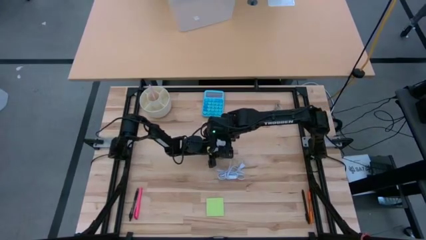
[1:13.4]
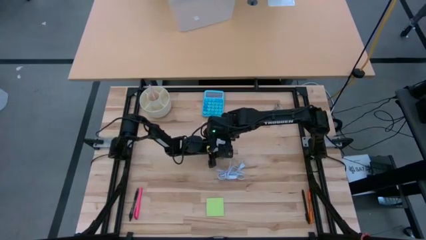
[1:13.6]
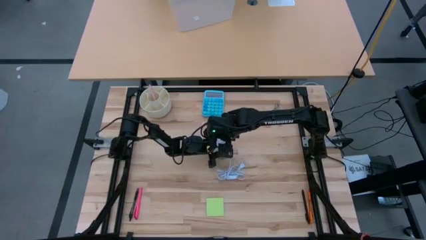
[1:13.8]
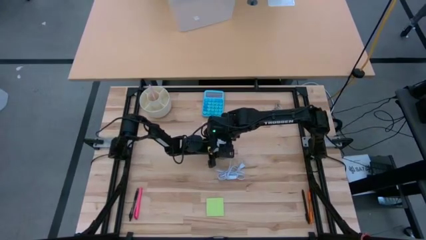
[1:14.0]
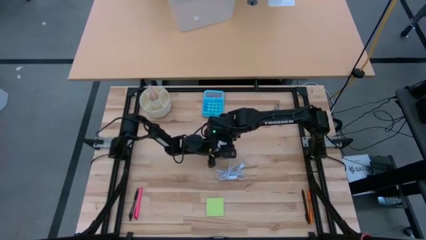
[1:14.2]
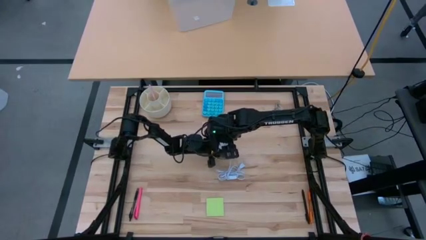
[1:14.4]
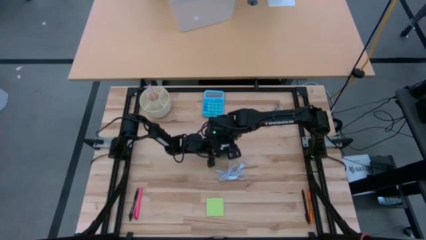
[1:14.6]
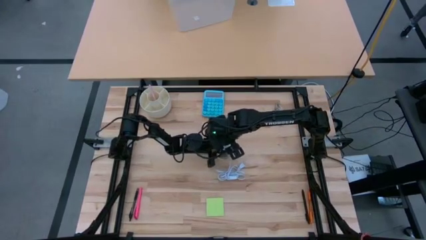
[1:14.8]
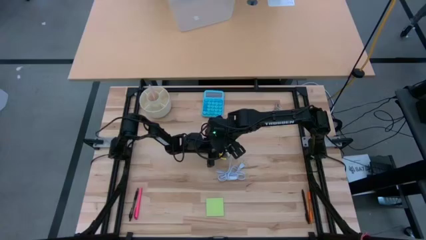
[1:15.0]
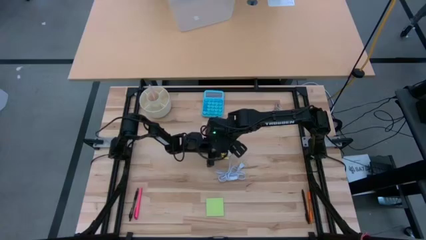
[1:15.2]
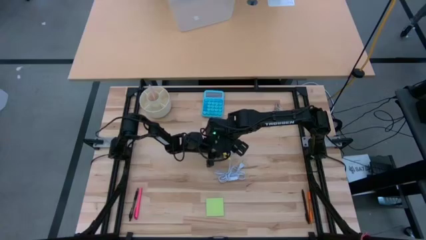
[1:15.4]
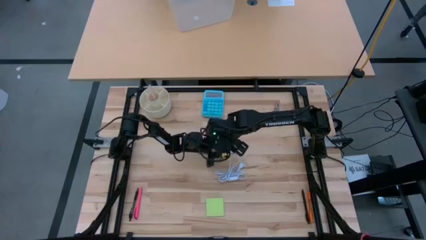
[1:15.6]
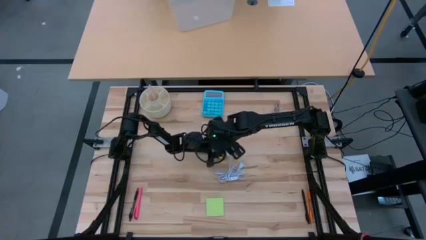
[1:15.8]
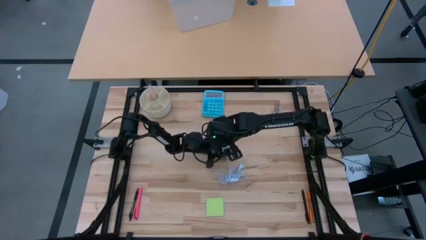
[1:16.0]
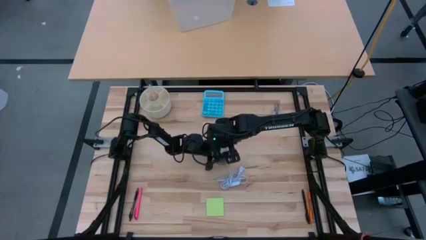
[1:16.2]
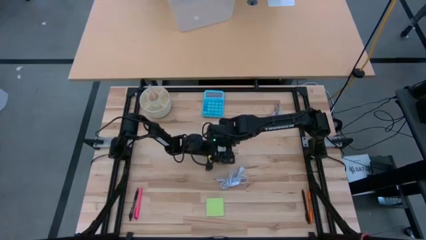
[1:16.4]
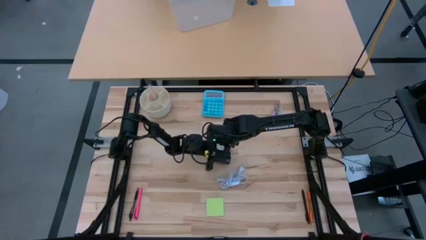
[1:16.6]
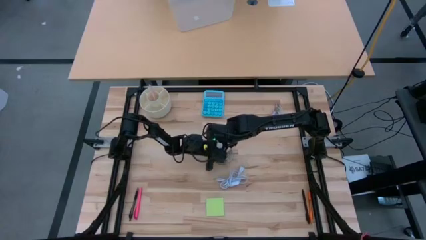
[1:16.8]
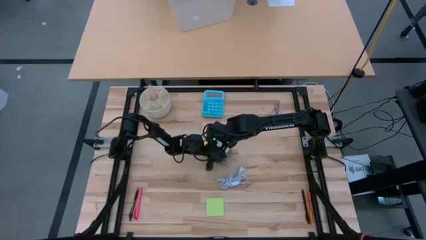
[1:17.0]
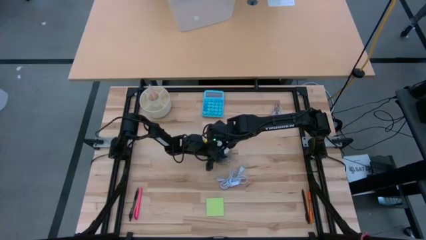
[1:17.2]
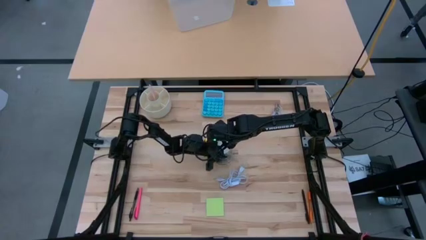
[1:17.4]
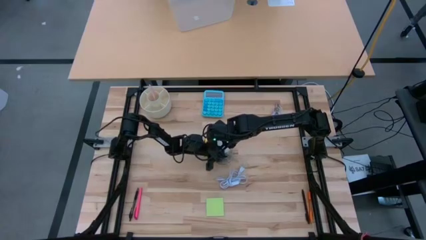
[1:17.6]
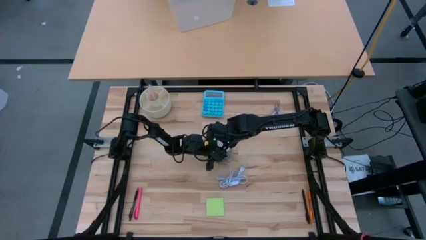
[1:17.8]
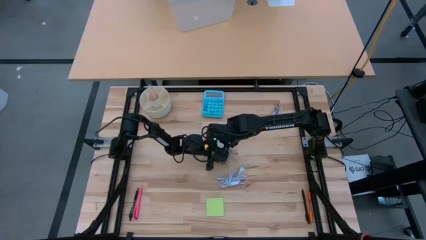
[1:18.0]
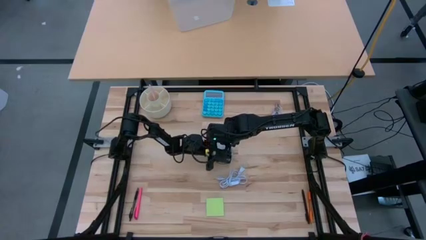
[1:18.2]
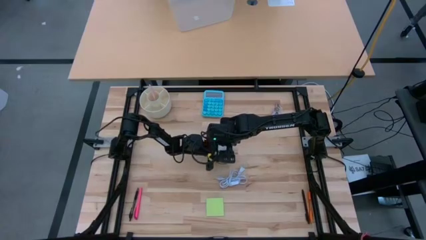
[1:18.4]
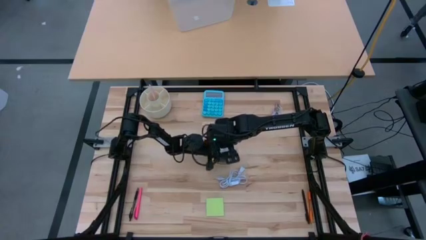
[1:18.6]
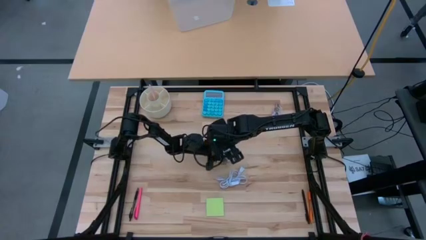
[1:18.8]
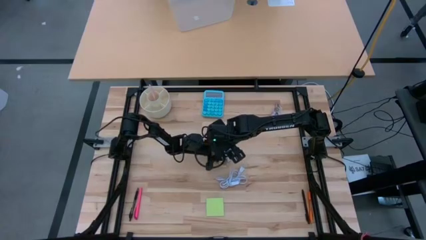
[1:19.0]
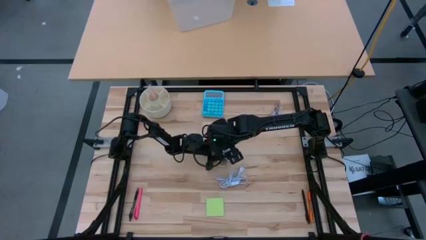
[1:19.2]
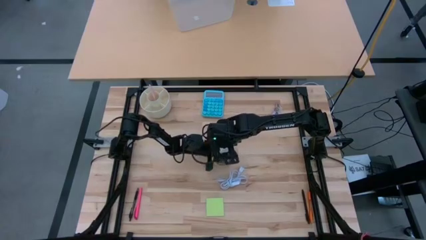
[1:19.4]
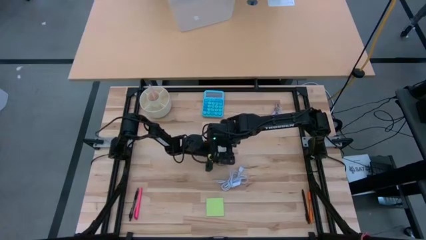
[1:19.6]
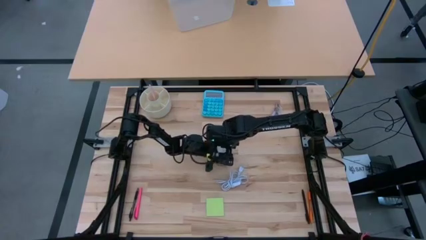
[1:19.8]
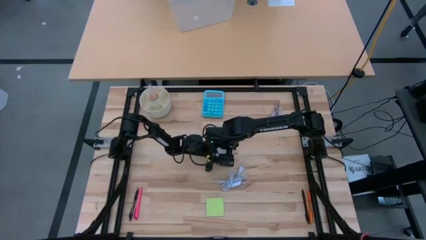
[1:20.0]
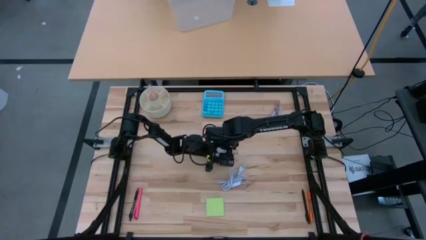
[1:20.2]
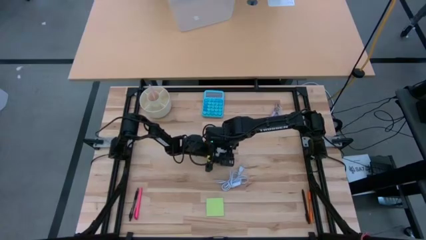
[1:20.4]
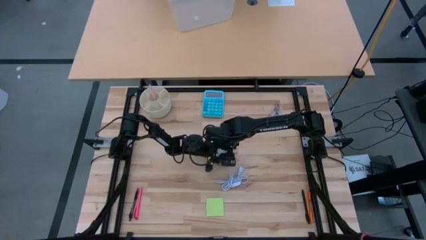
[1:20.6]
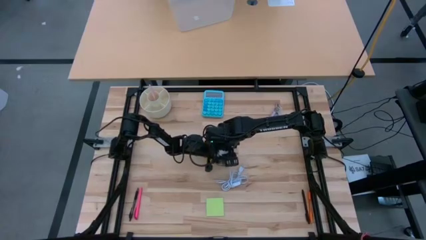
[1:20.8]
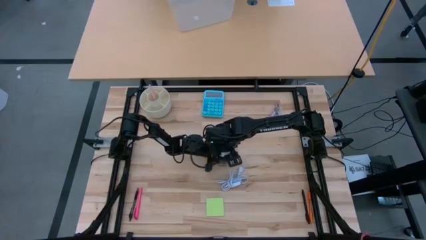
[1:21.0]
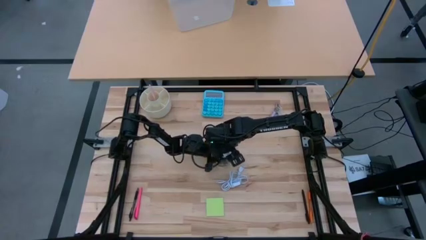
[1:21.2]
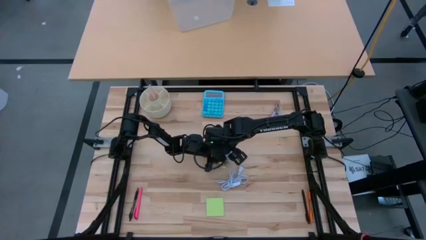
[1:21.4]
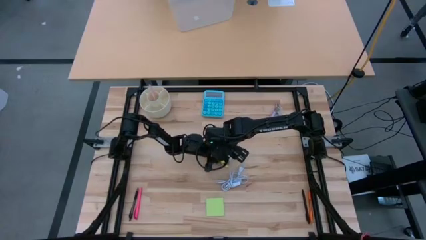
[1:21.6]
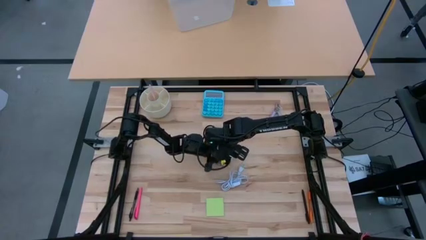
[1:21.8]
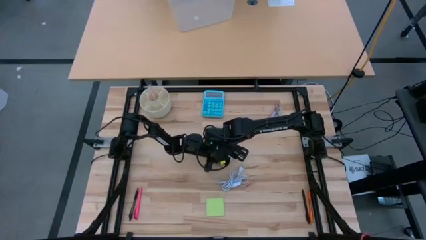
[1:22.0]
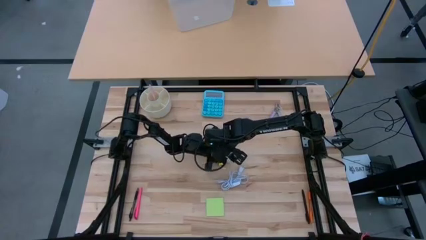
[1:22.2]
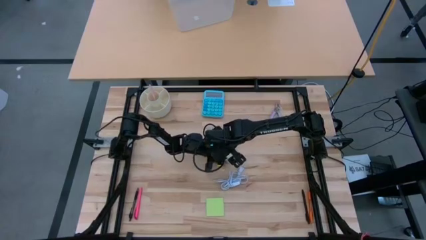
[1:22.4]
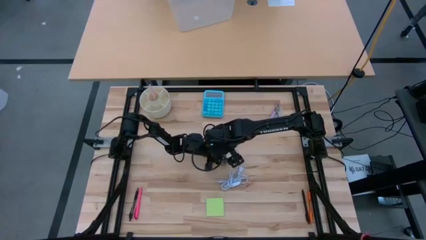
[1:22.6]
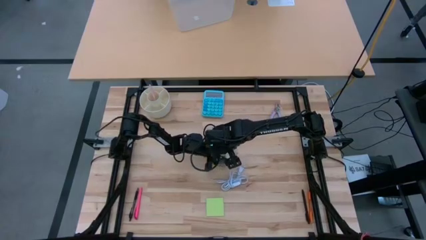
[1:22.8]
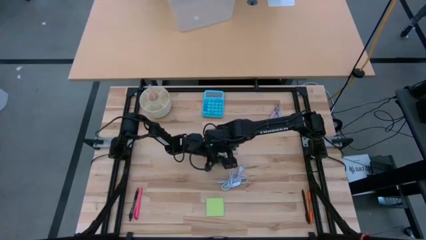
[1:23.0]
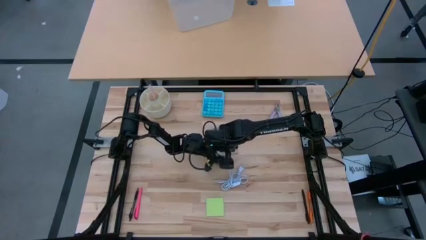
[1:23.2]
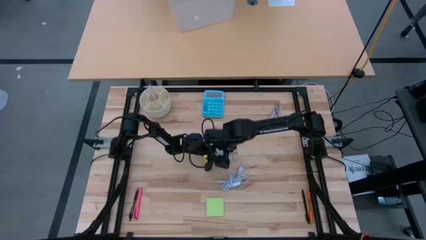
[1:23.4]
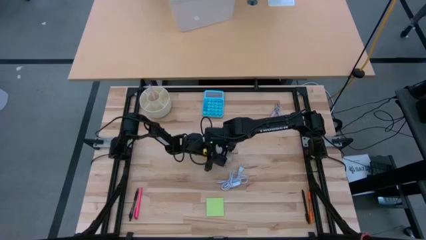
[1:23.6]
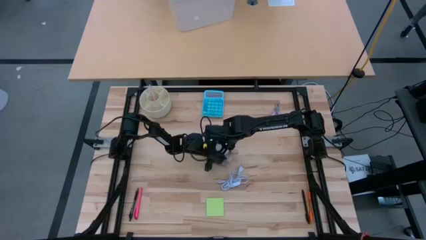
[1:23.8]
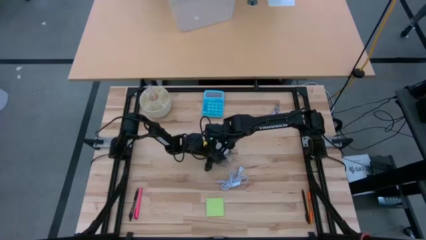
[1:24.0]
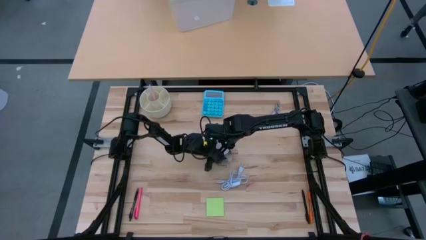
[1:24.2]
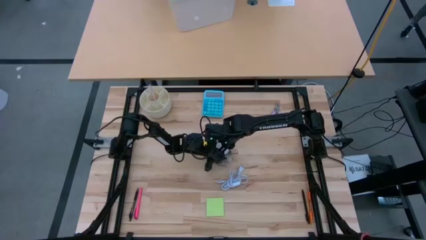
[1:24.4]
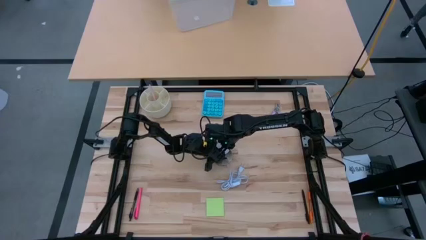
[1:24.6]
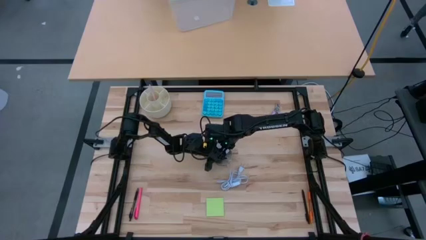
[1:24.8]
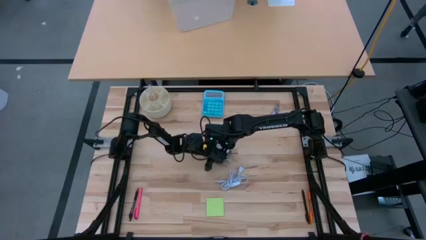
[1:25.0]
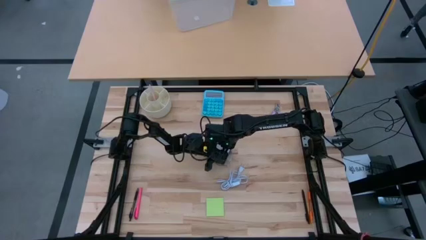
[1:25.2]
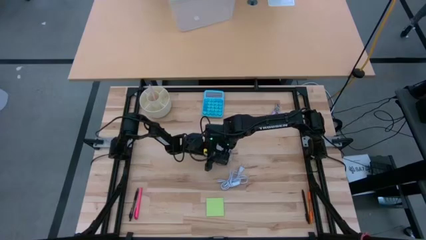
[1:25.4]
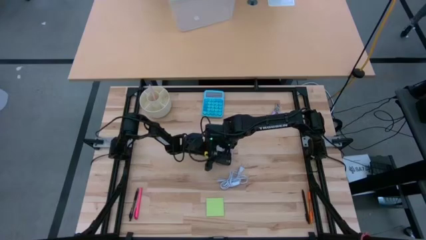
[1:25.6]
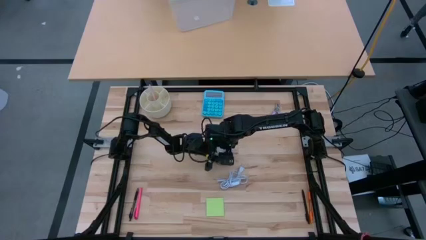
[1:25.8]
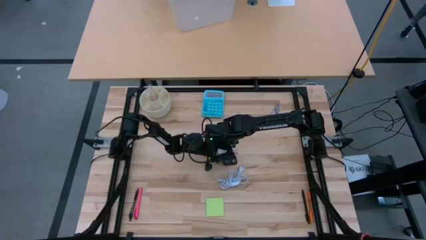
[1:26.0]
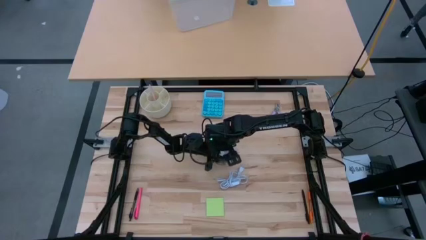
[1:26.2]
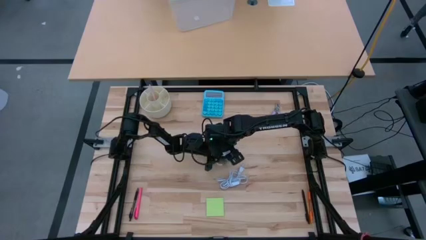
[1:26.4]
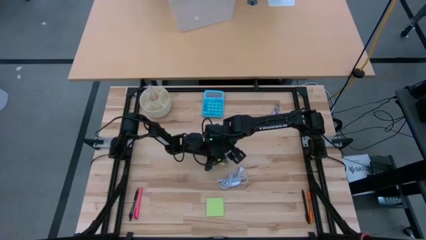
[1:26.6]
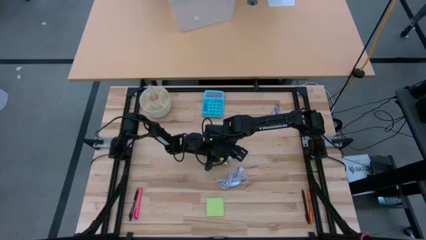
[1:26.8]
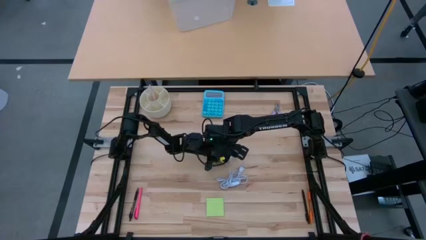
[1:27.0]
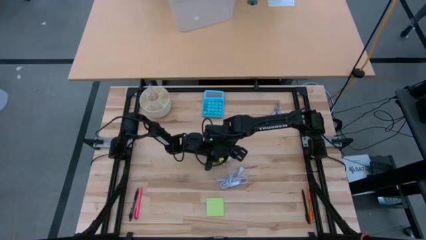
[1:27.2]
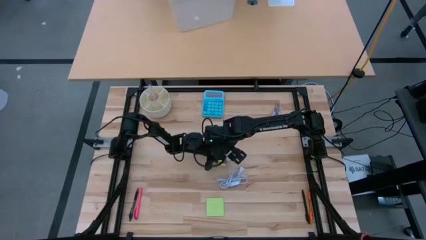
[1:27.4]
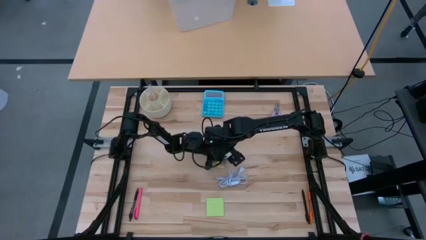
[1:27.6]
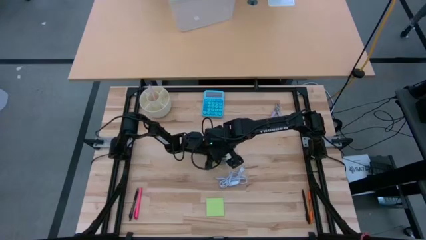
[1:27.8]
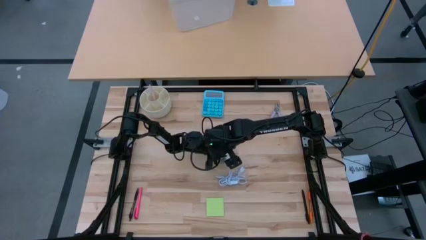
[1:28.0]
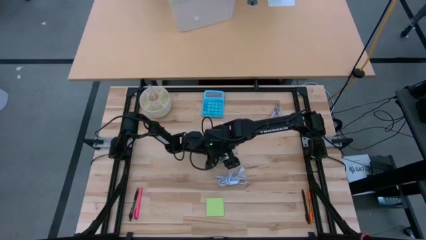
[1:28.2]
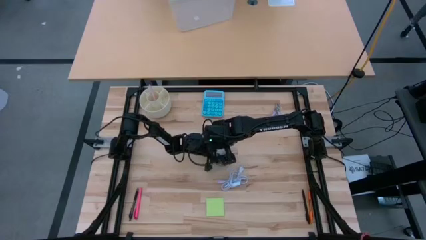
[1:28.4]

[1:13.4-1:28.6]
Task: Screw lightbulb
Remove the lightbulb from the lamp
